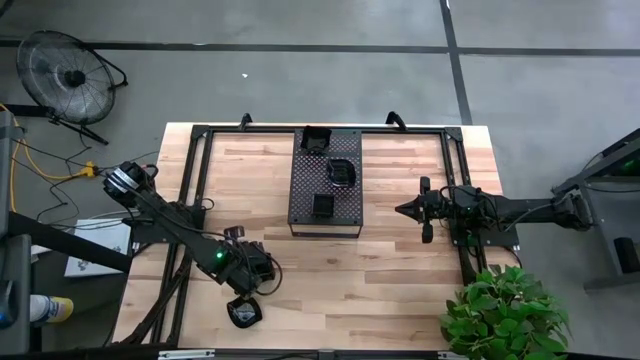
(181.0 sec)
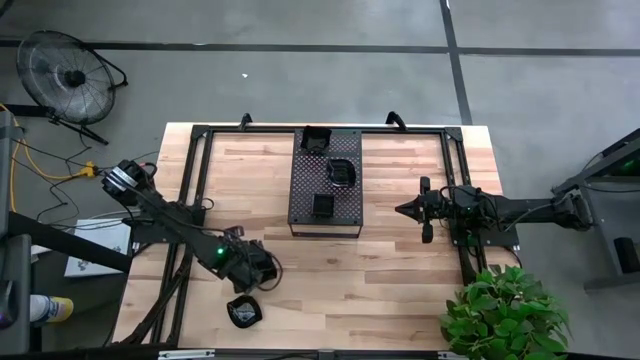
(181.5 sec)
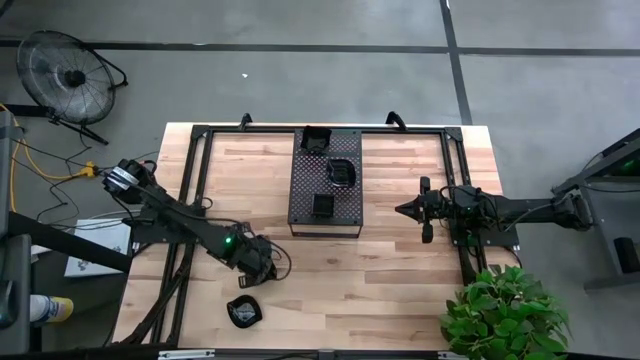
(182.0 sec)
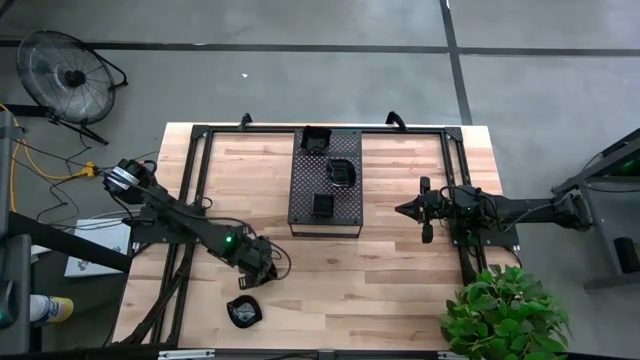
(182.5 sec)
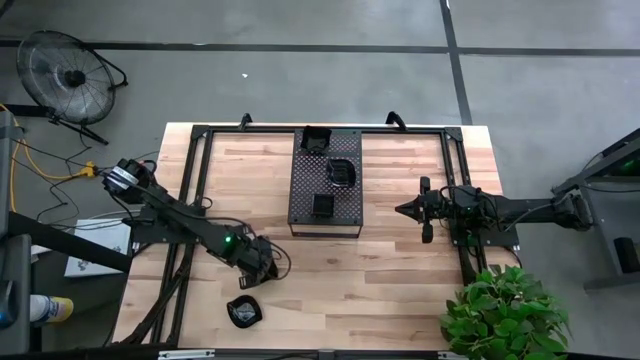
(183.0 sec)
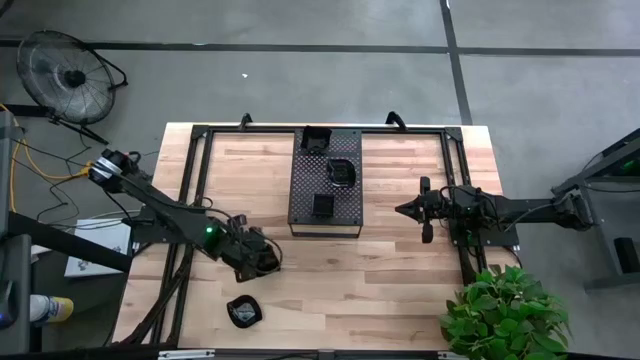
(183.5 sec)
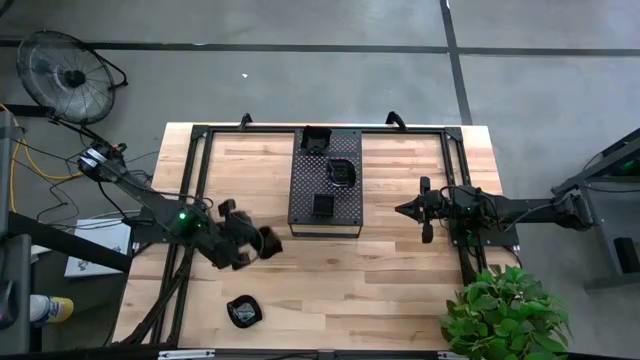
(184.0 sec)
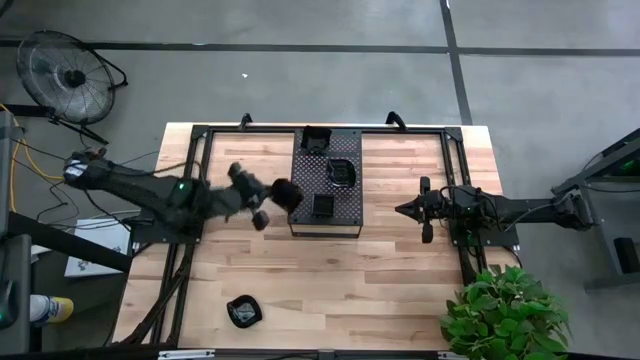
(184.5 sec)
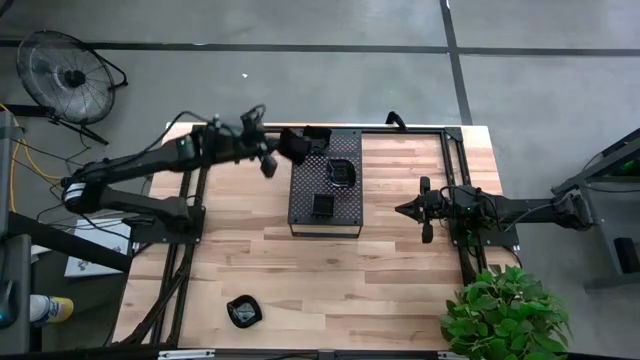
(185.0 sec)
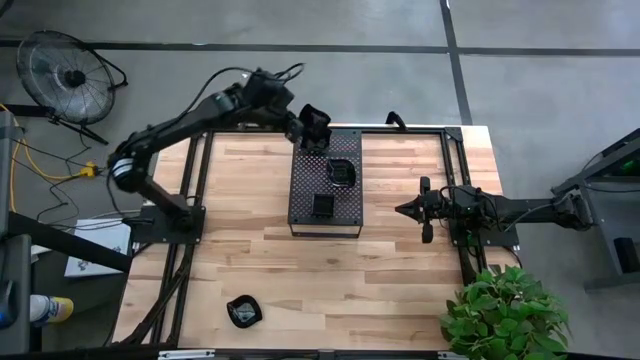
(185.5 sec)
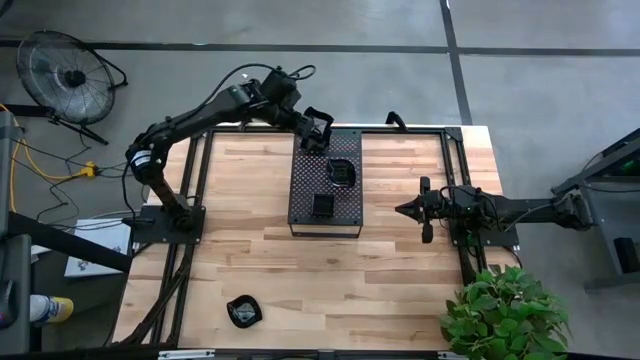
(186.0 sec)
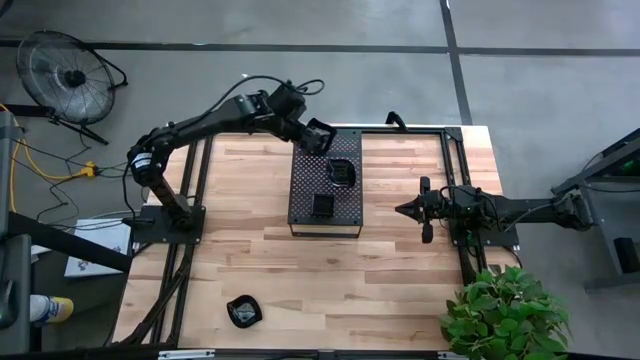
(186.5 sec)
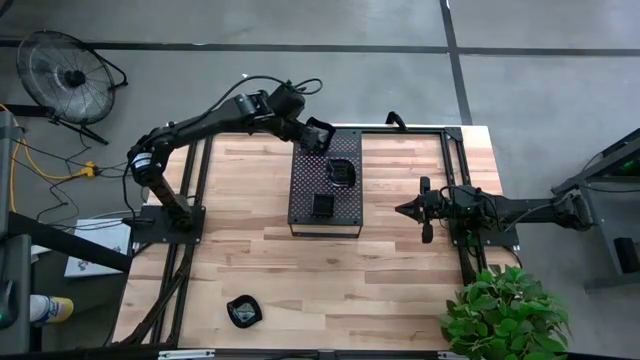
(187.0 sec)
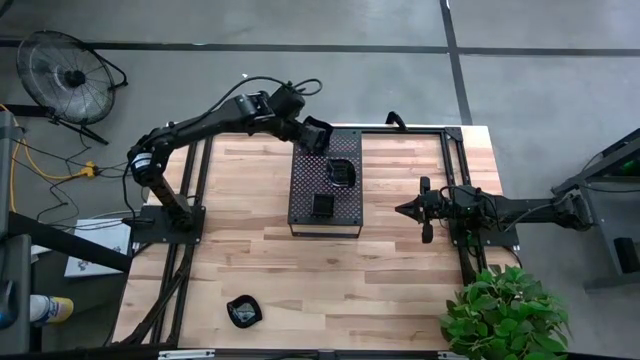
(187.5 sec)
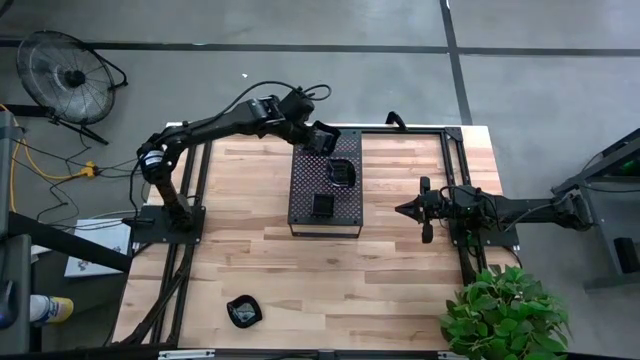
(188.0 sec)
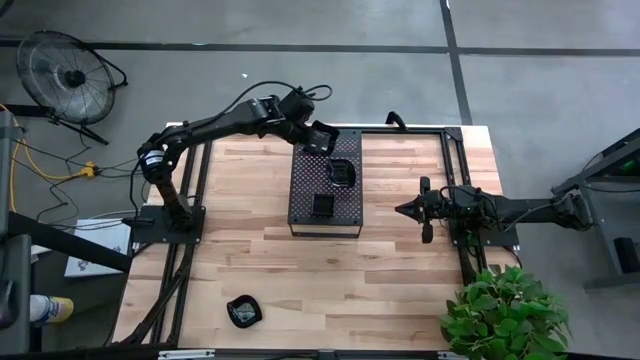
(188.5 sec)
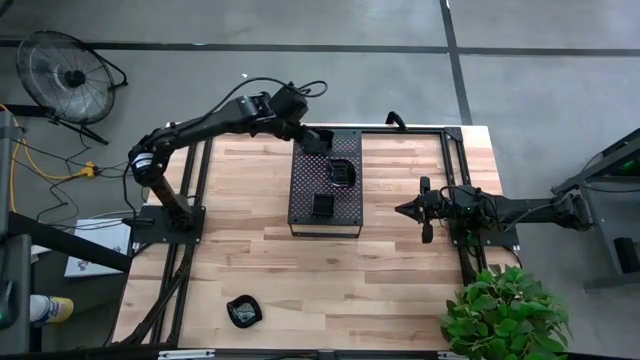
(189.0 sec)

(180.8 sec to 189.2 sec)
Task: Pick & Place Mini shaped plates
Stack the black distorted square plate on top of the other black distorted square plate on the shelf

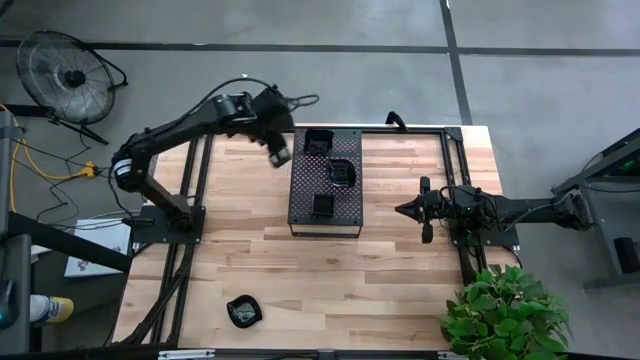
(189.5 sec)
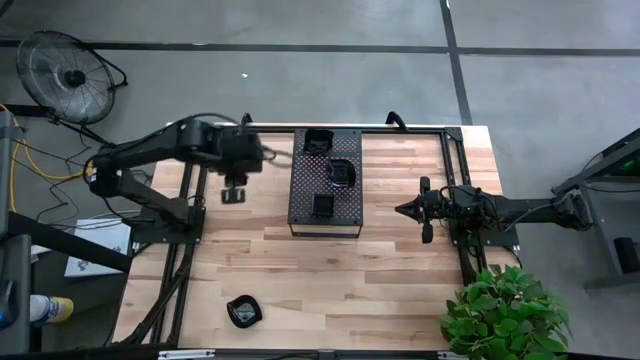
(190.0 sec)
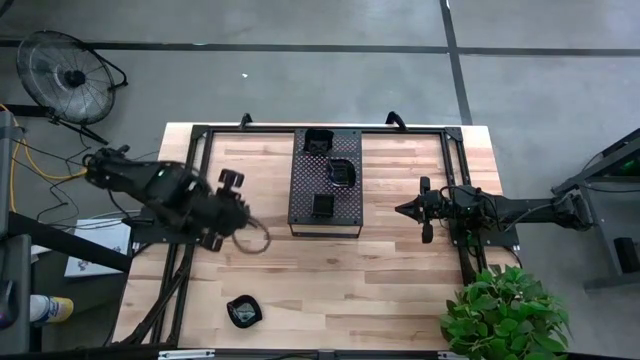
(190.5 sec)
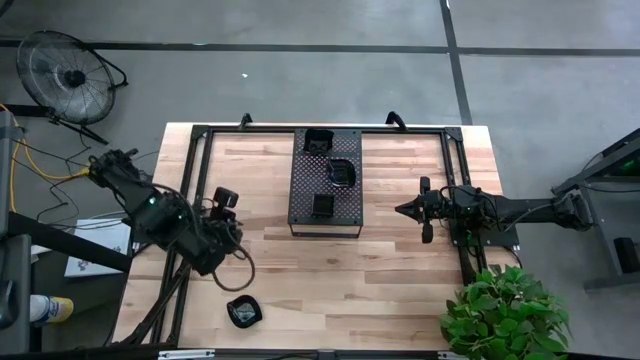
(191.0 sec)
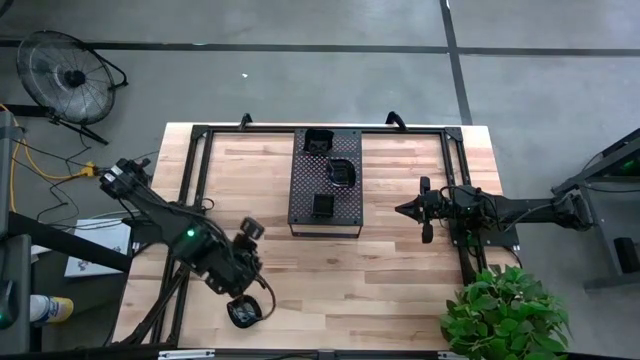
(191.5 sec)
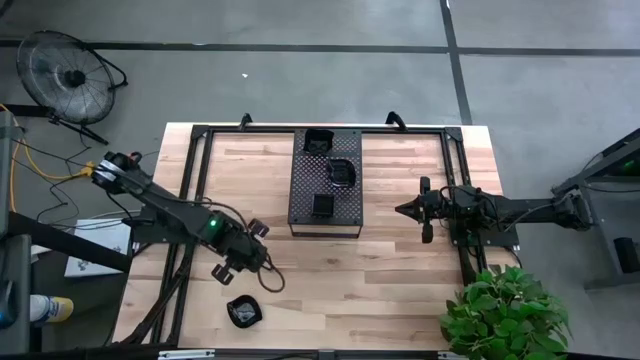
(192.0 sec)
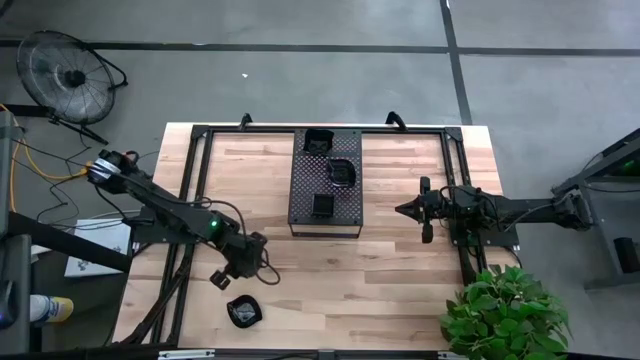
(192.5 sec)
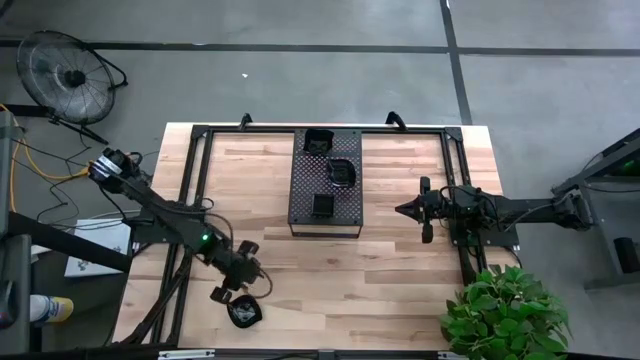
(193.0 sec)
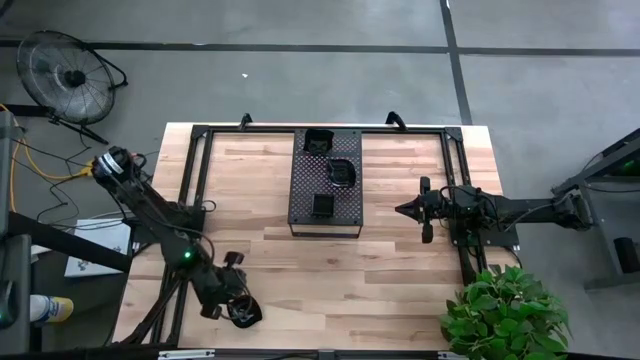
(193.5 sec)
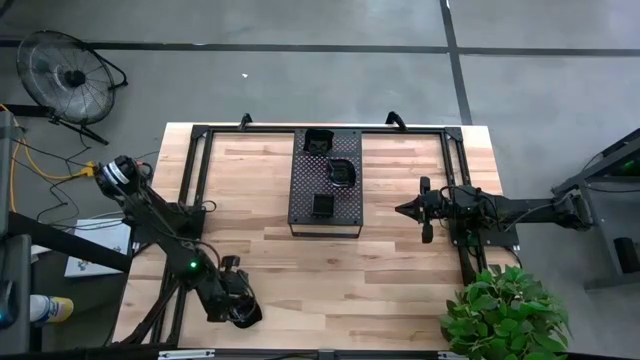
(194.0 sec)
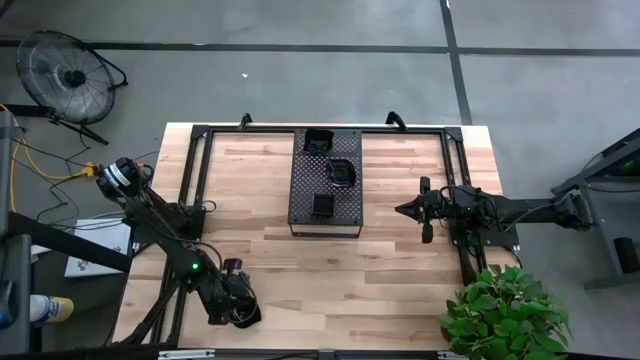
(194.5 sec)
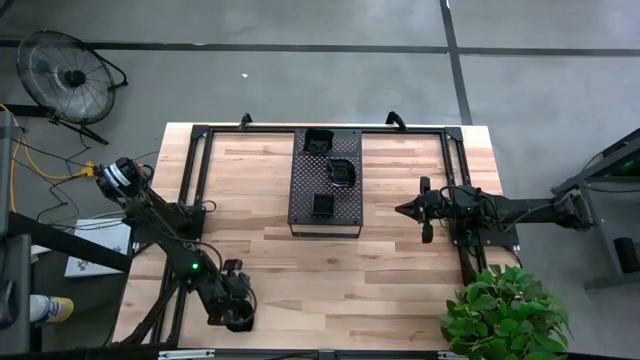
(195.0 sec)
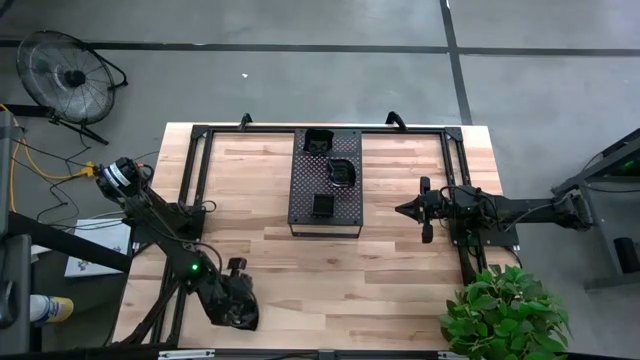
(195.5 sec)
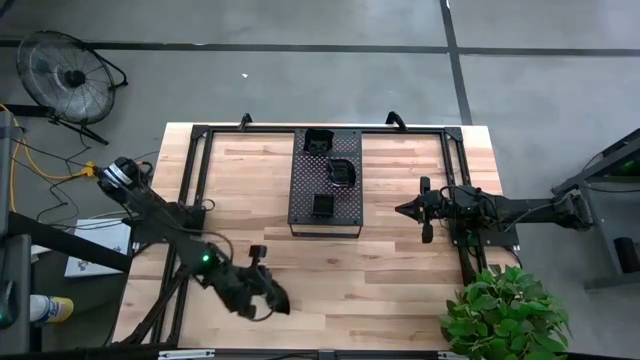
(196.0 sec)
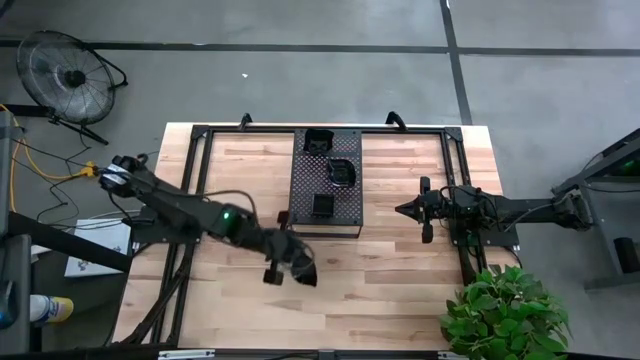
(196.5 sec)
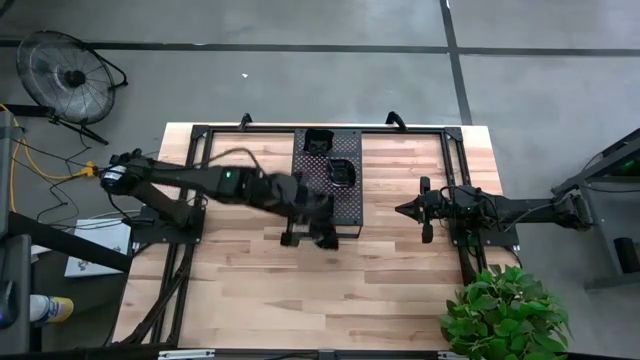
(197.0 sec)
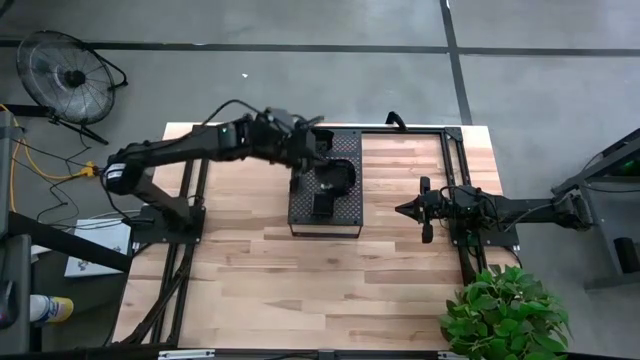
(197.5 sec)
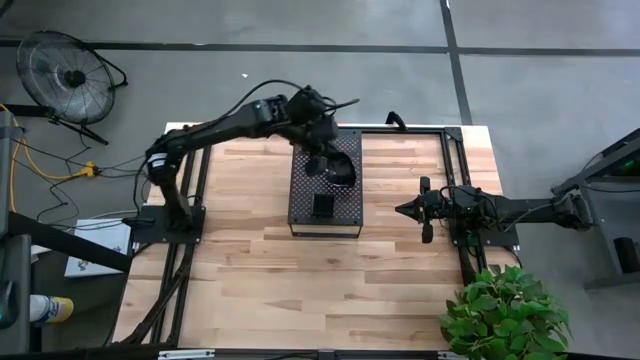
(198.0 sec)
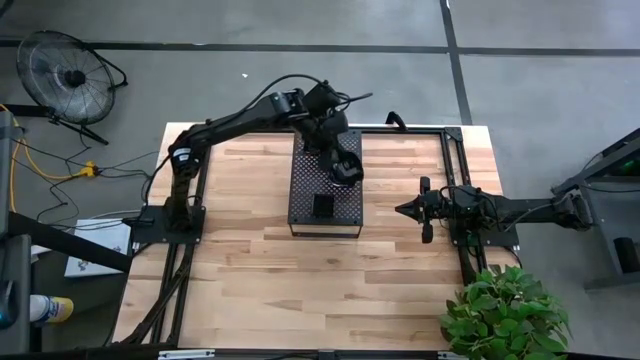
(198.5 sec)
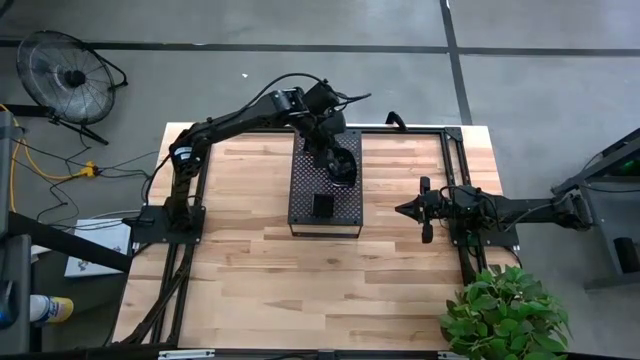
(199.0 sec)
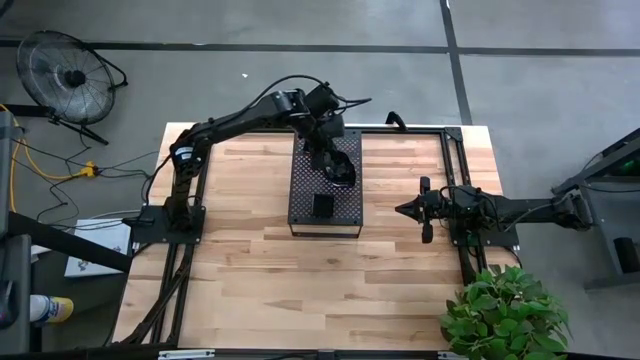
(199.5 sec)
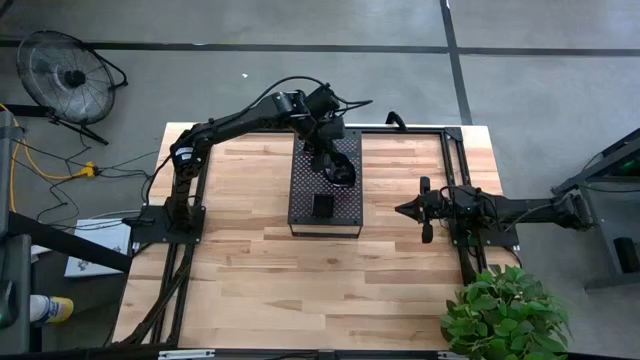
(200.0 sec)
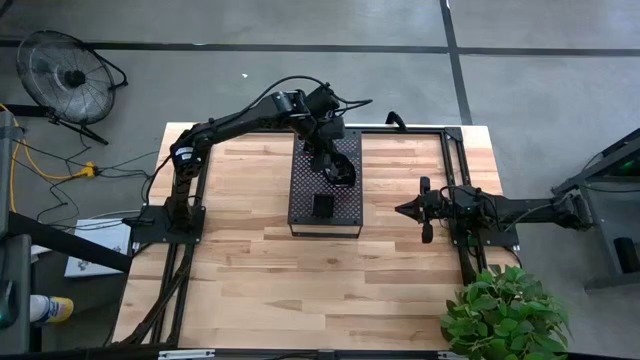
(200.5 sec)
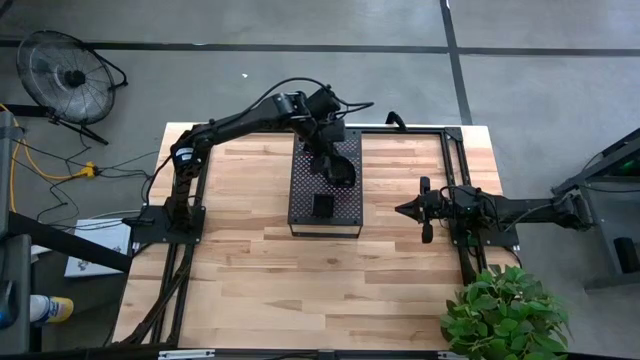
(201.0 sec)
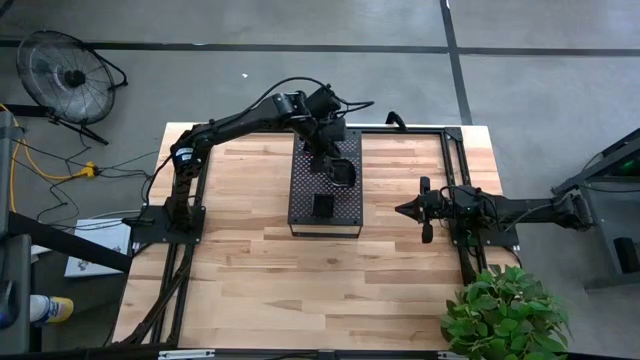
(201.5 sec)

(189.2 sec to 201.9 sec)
Stack the black leaf shape plate on top of the other black leaf shaped plate on the shelf

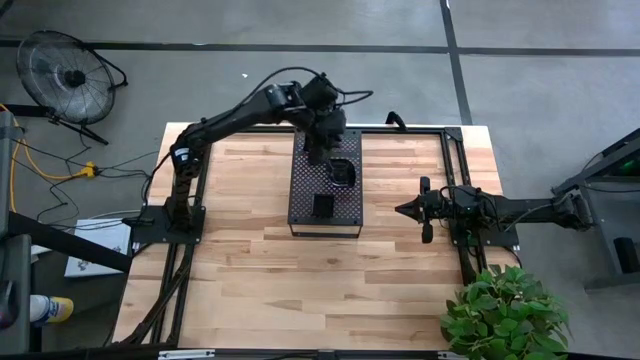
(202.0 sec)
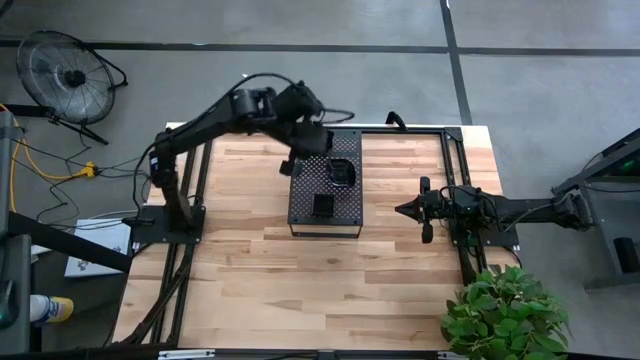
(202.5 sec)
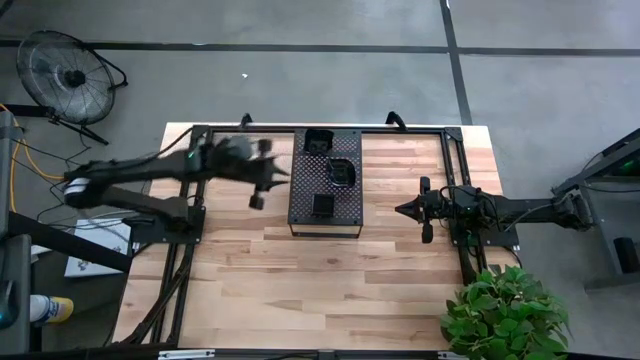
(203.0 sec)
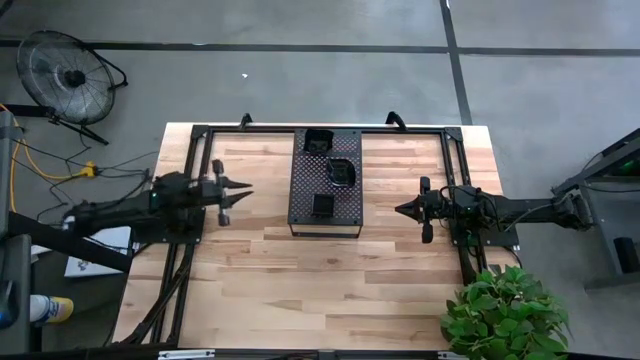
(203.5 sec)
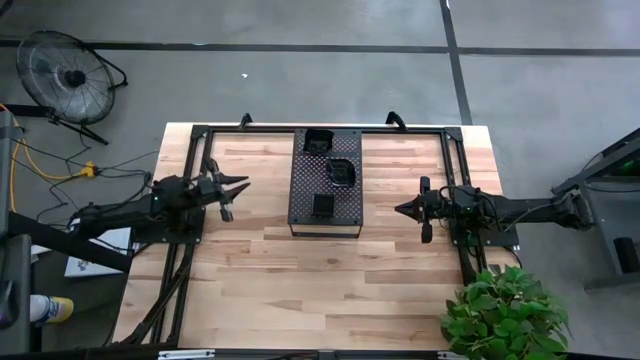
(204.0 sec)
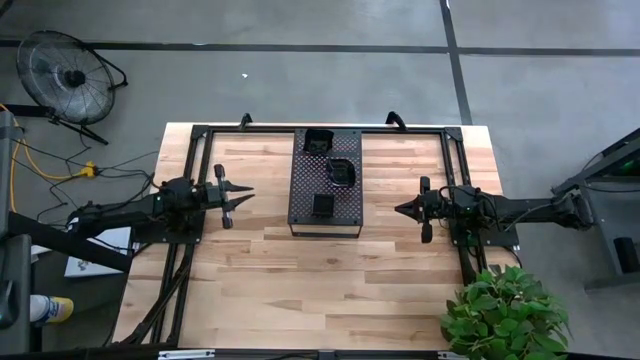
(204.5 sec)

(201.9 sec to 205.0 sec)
Return to Home Position
